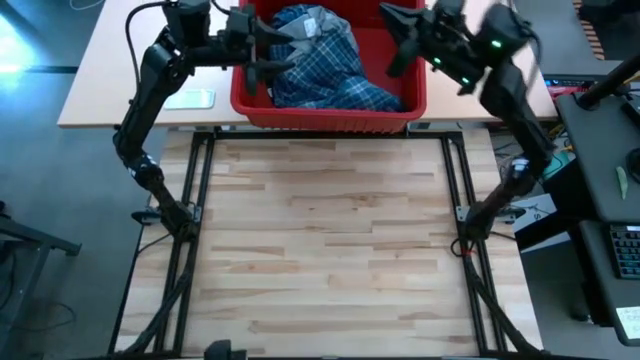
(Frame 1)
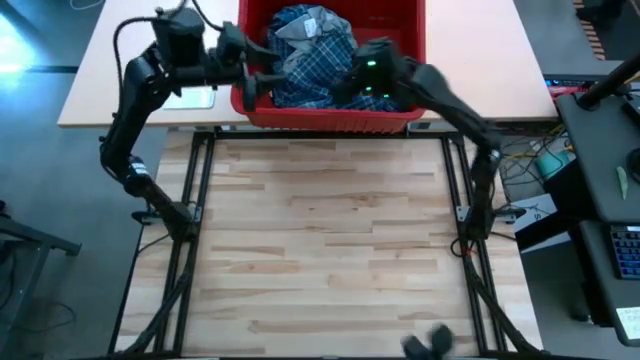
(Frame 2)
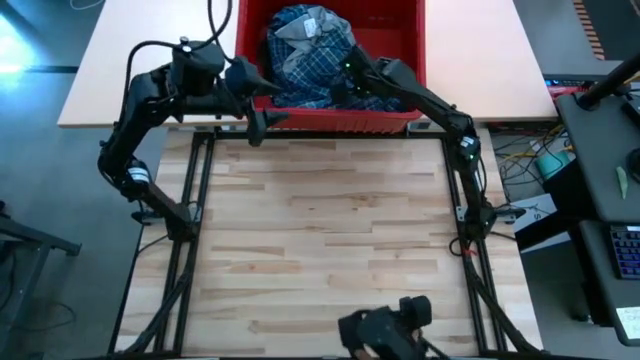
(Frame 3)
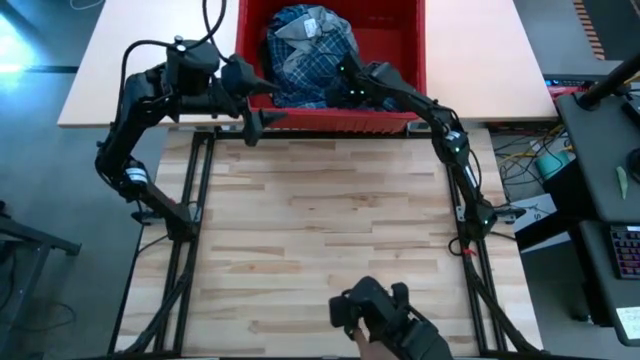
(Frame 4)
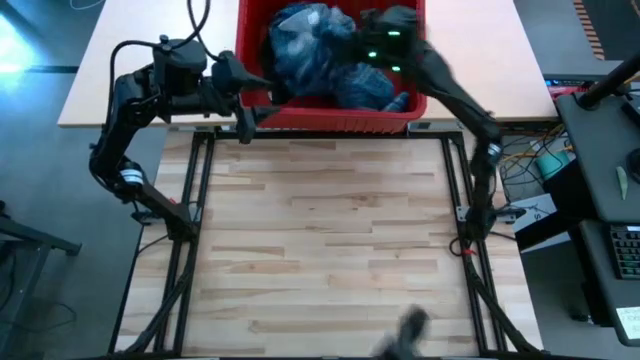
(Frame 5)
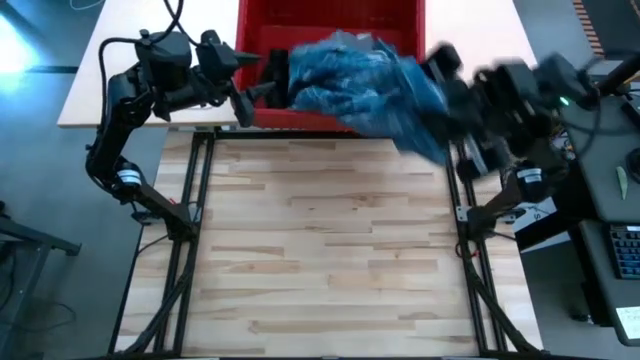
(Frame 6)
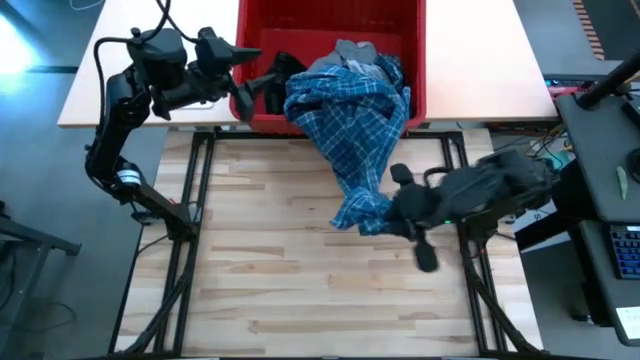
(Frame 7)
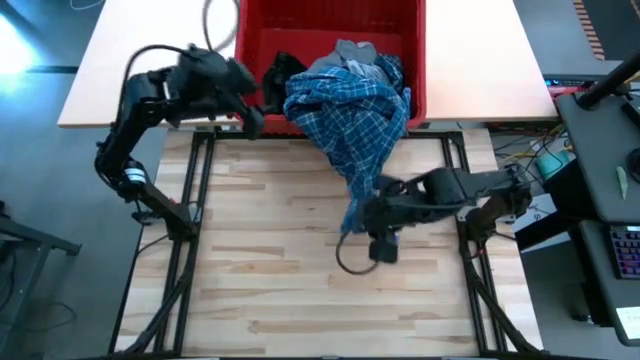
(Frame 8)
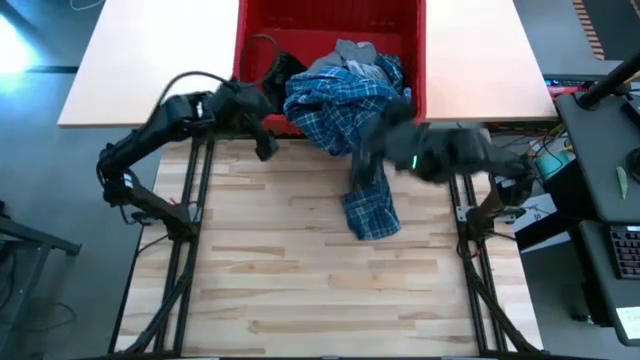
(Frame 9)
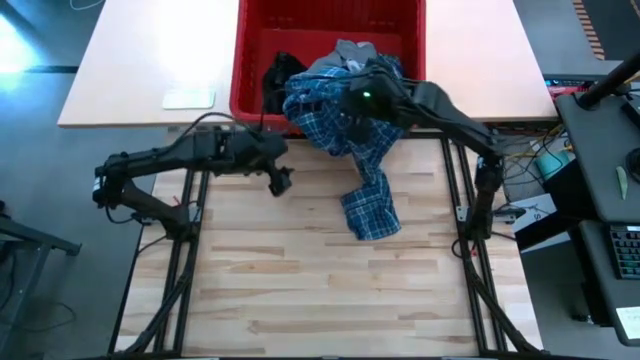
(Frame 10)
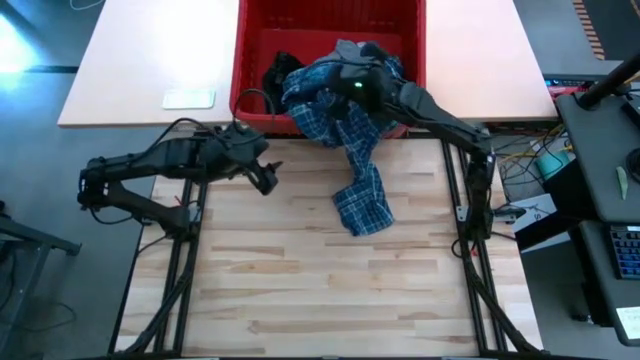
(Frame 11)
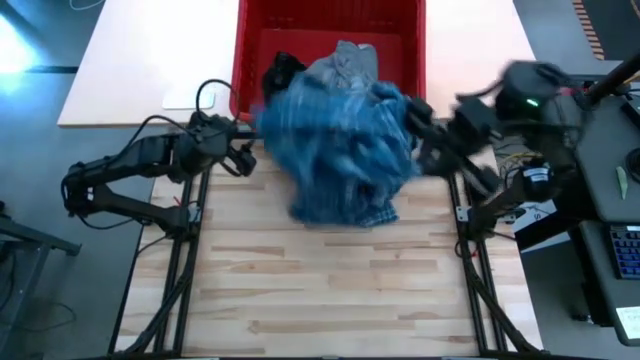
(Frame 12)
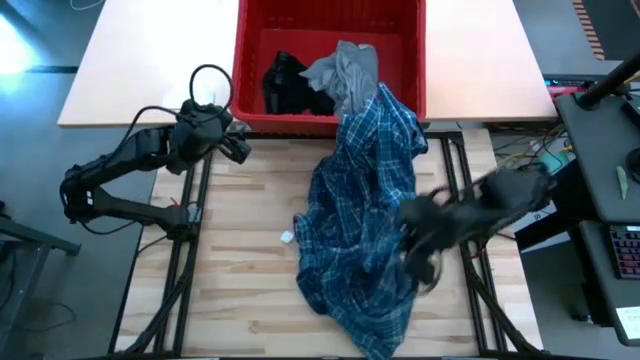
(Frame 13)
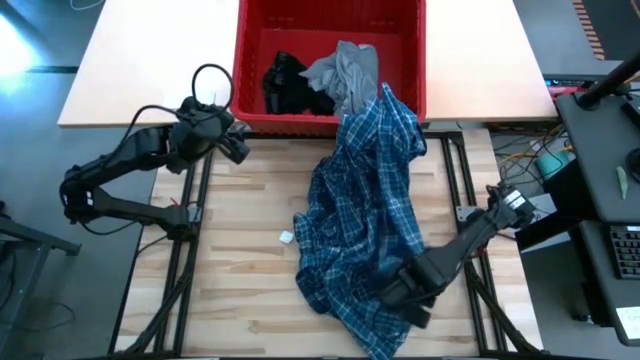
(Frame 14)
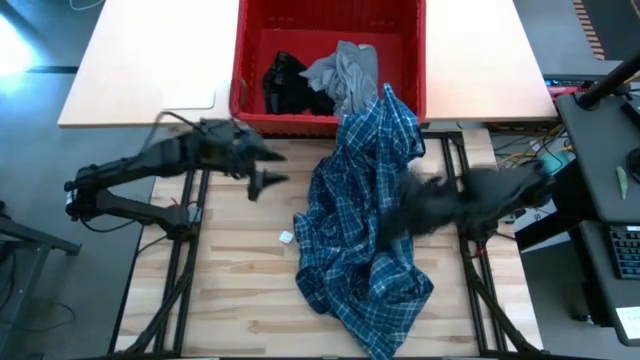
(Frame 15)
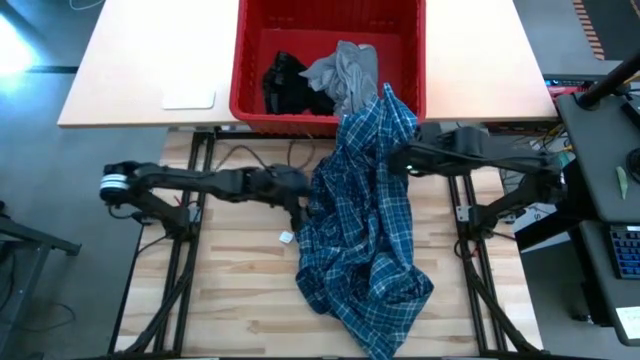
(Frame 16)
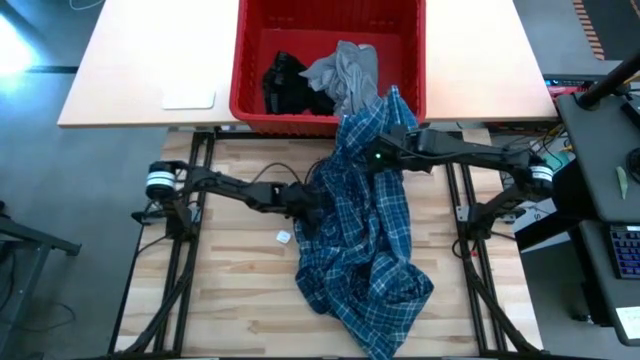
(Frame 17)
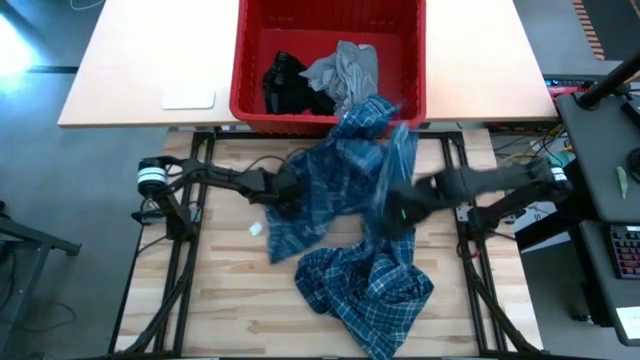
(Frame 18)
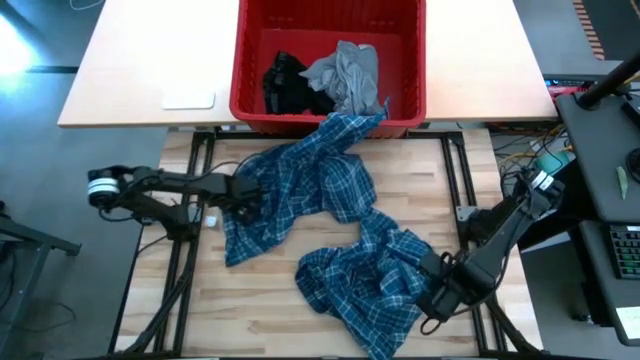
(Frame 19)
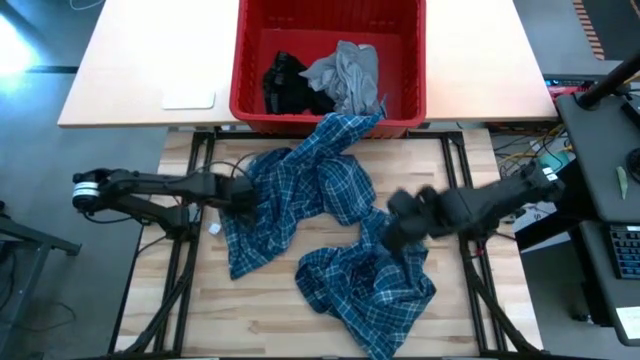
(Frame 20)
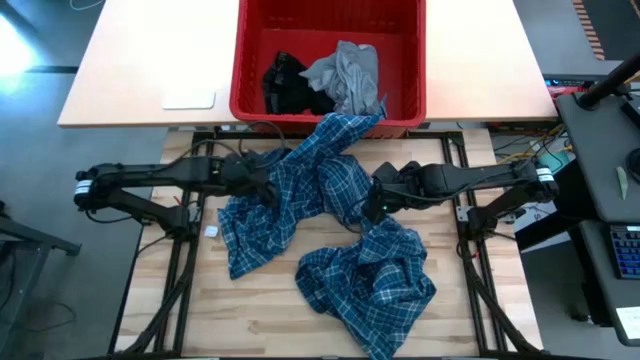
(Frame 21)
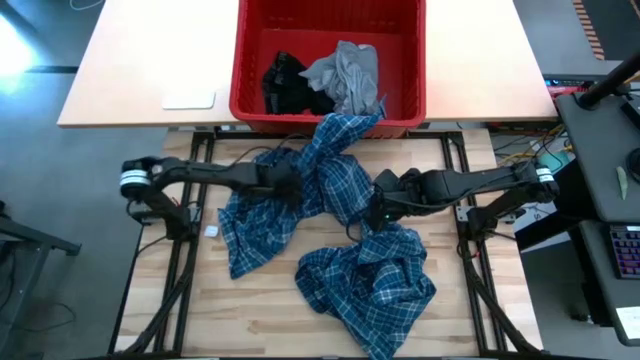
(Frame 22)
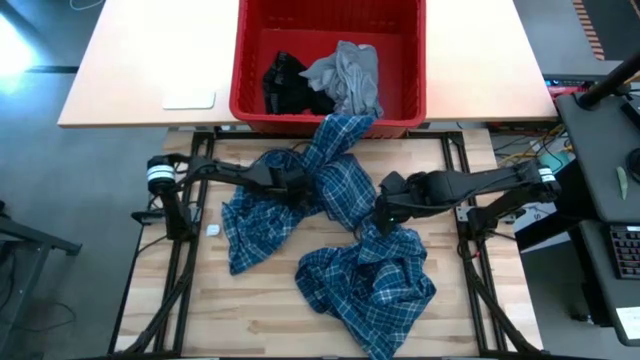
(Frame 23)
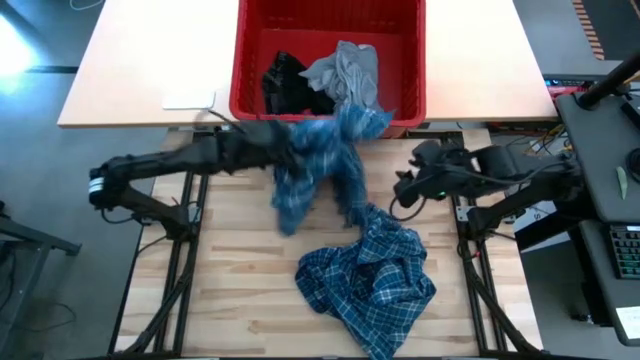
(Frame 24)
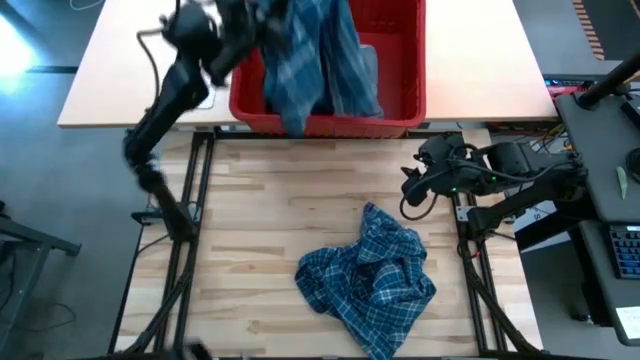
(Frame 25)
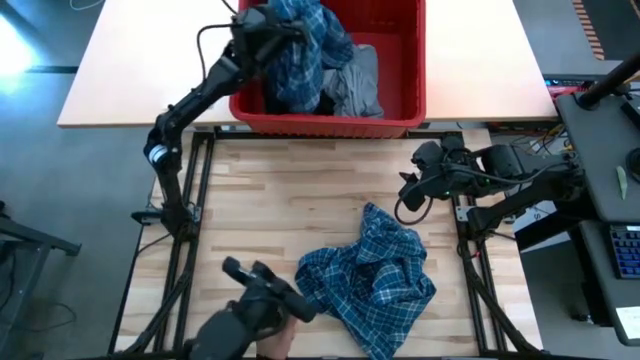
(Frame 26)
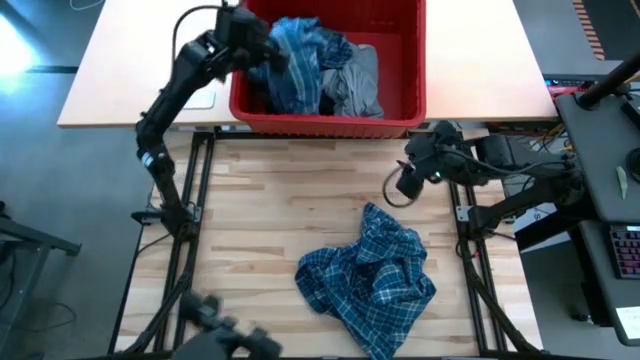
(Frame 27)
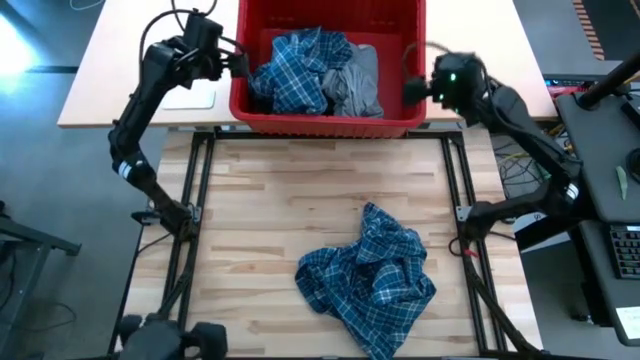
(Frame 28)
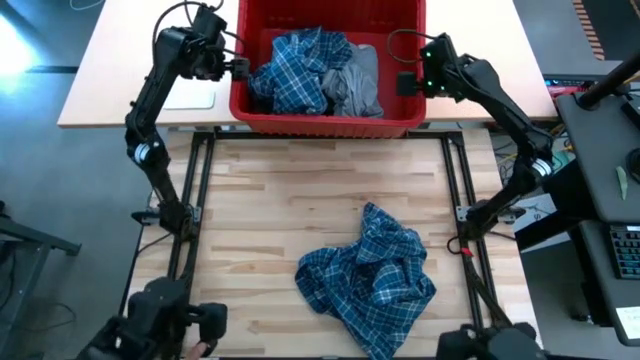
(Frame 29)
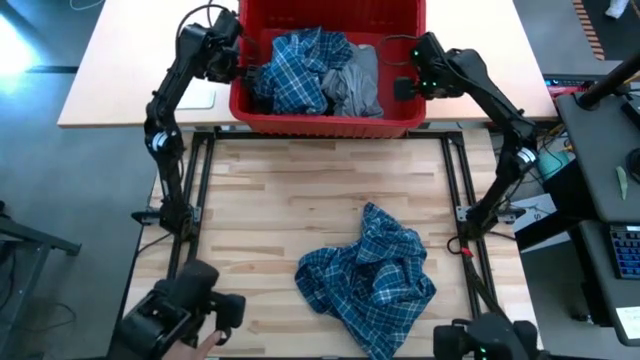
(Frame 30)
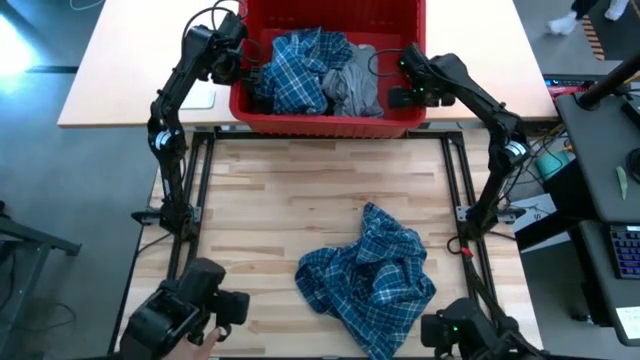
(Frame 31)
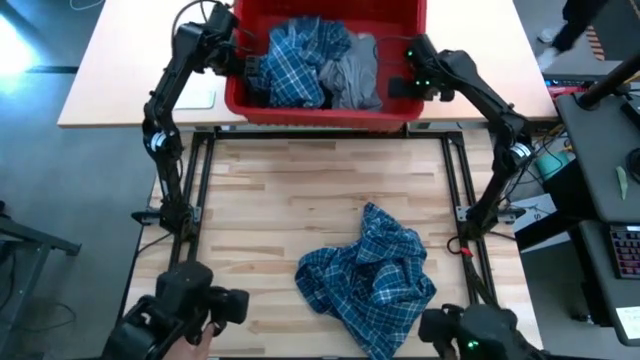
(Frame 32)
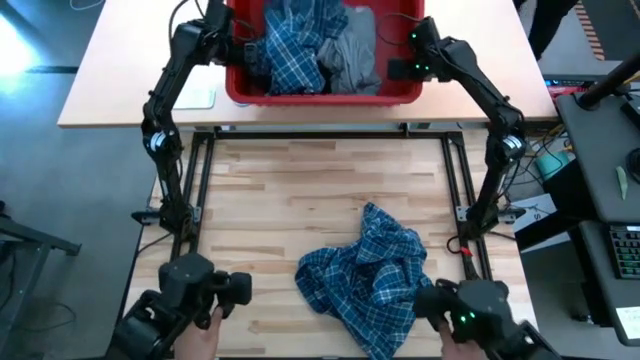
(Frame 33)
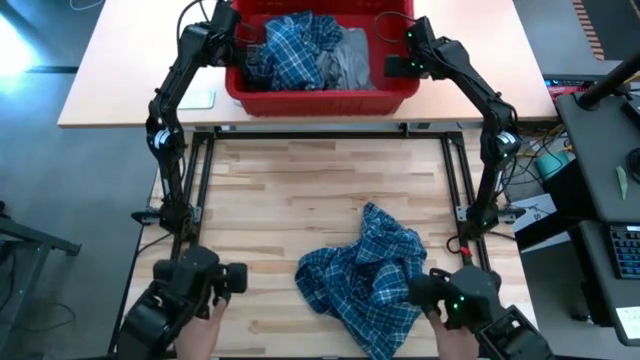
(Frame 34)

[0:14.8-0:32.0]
Task: Fold Laundry from Bin
Fold the blue patterned pants

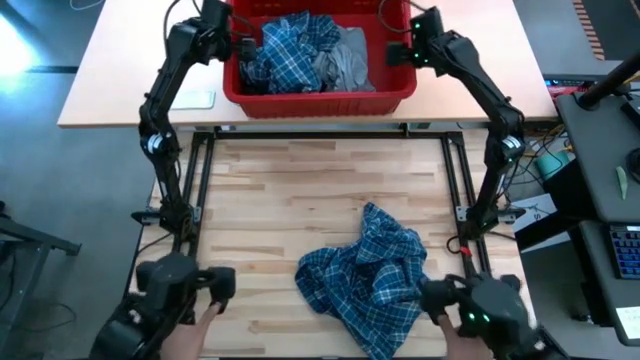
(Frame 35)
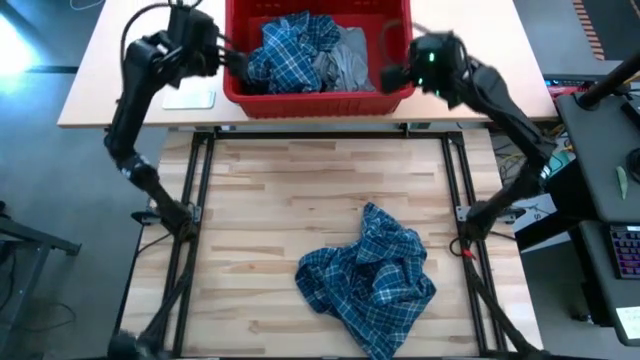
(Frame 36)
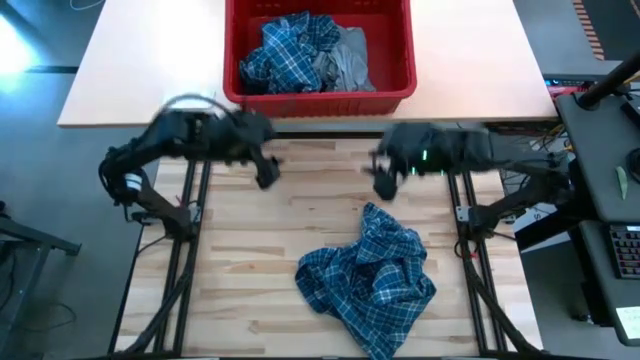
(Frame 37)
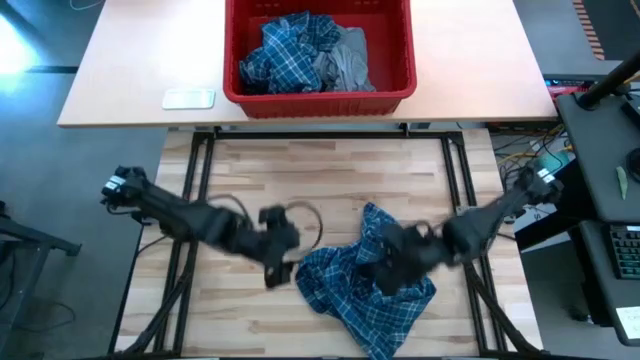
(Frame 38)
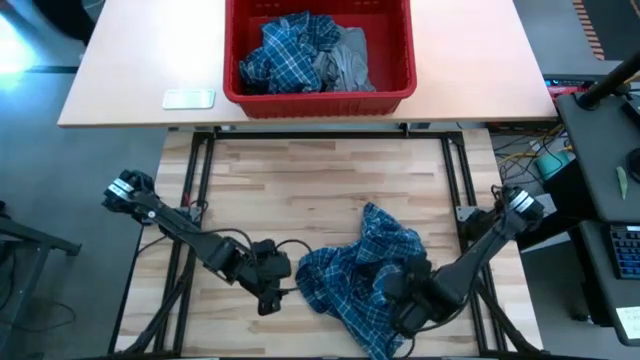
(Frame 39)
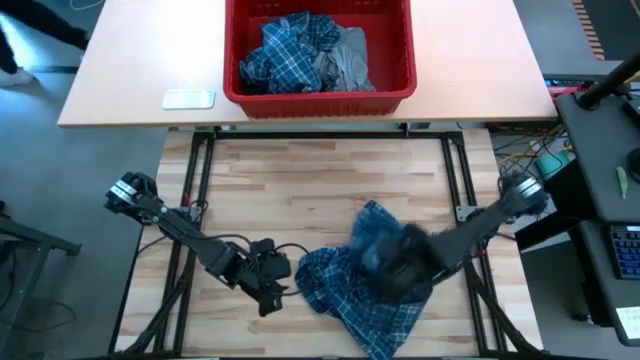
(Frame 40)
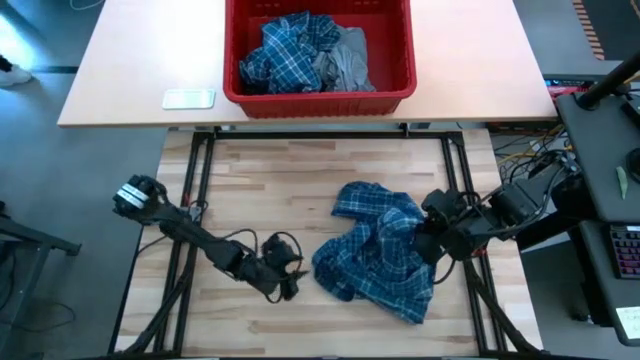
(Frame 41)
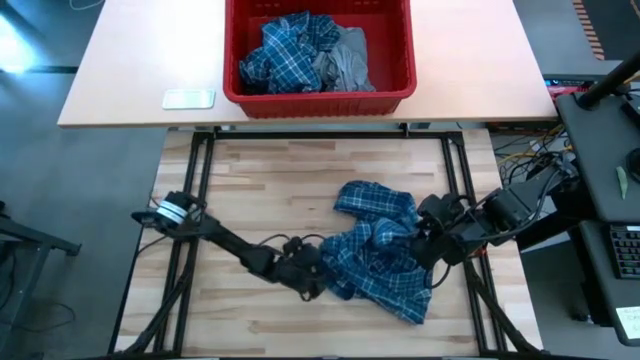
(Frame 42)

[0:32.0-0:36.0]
Fold the blue patterned pants
